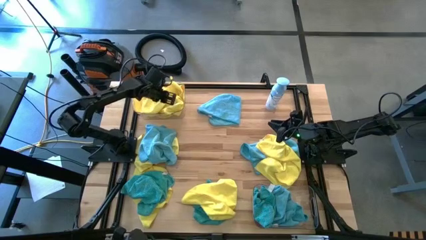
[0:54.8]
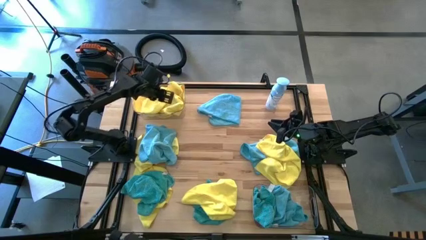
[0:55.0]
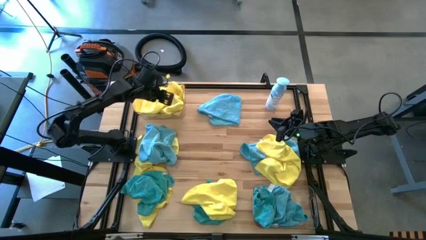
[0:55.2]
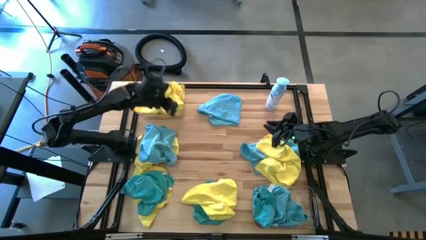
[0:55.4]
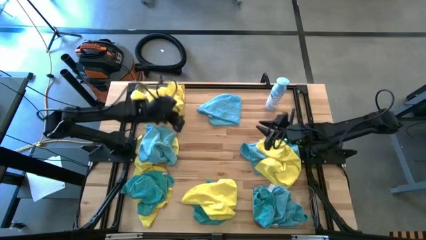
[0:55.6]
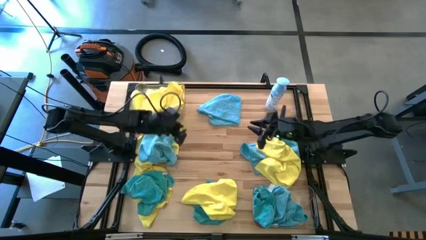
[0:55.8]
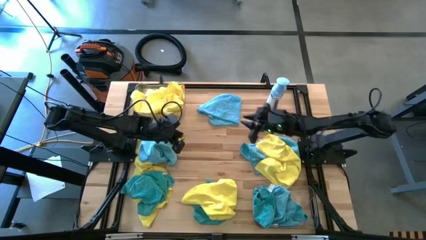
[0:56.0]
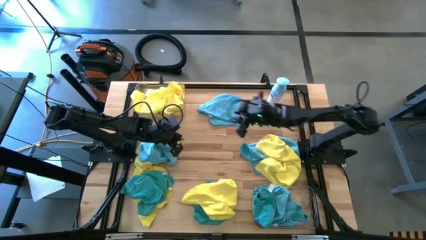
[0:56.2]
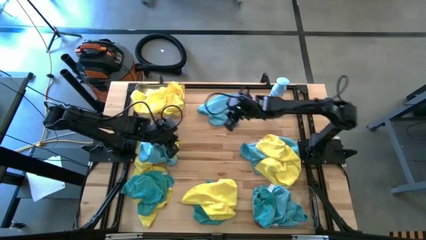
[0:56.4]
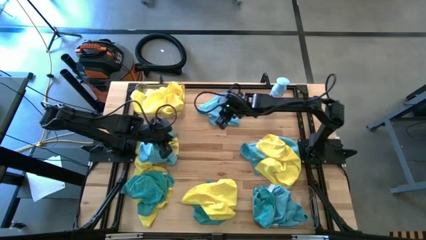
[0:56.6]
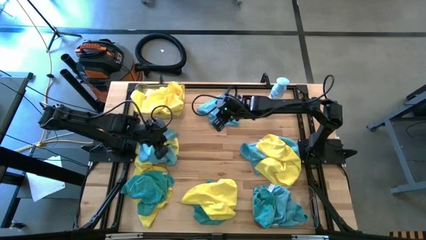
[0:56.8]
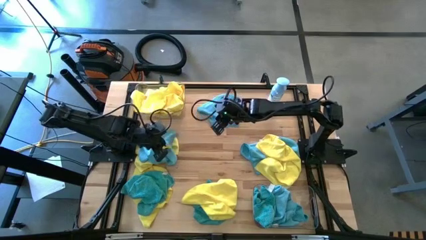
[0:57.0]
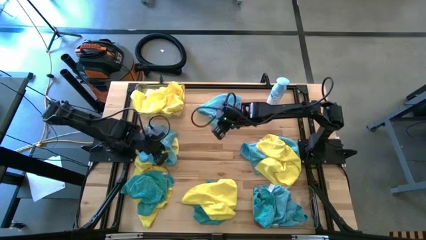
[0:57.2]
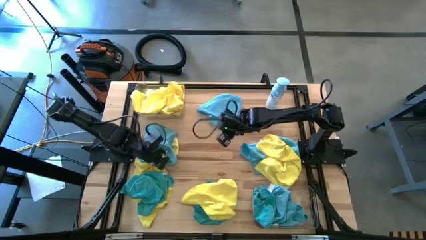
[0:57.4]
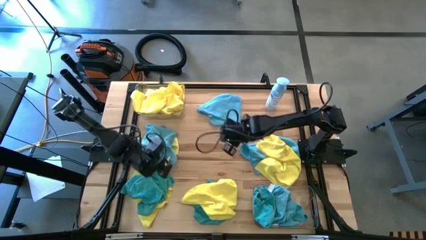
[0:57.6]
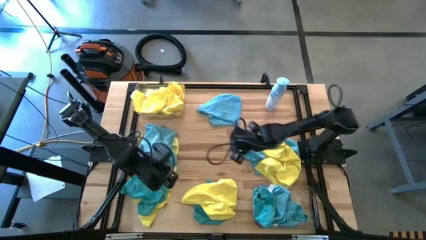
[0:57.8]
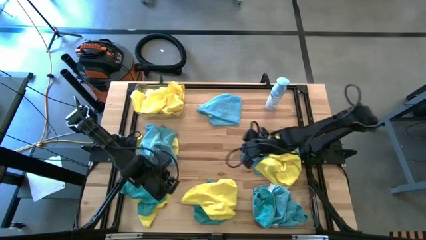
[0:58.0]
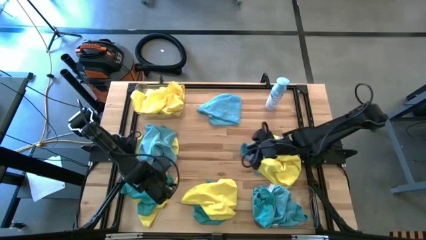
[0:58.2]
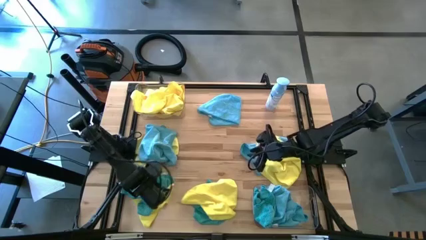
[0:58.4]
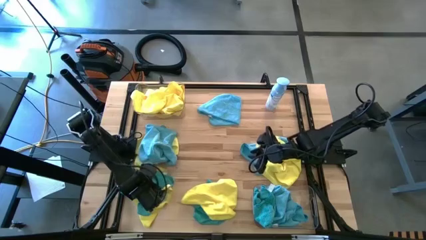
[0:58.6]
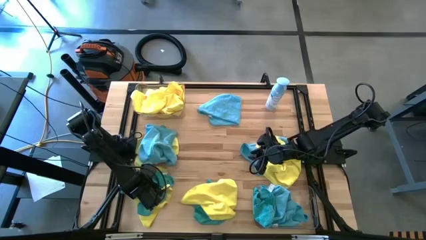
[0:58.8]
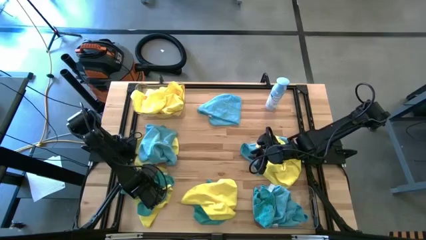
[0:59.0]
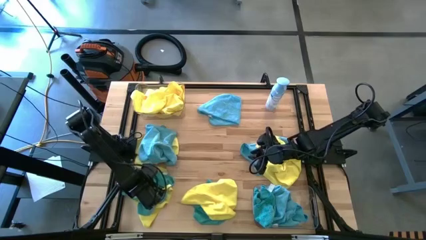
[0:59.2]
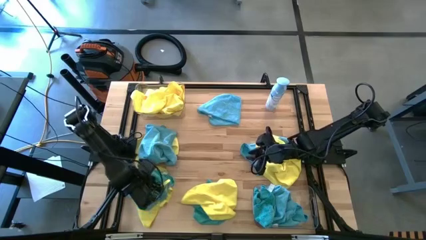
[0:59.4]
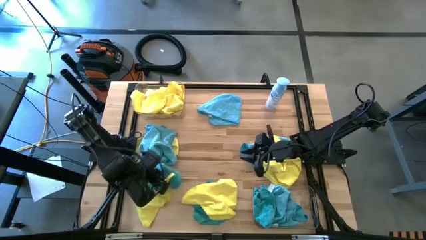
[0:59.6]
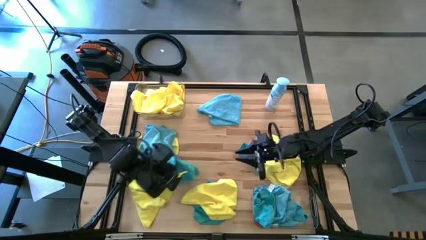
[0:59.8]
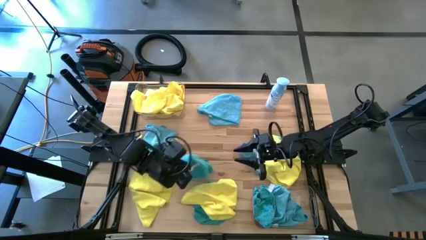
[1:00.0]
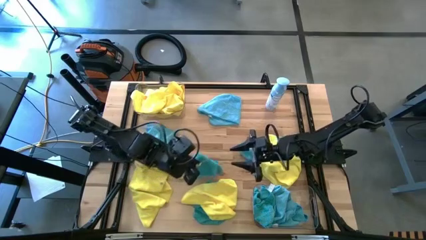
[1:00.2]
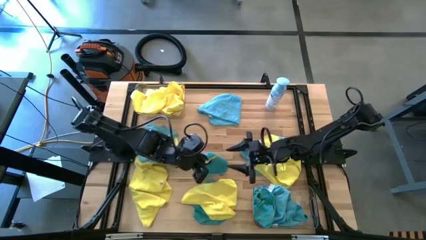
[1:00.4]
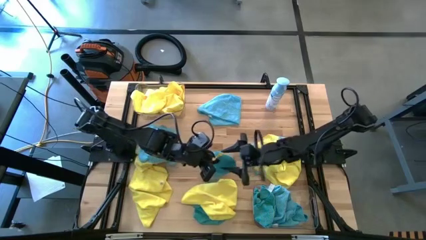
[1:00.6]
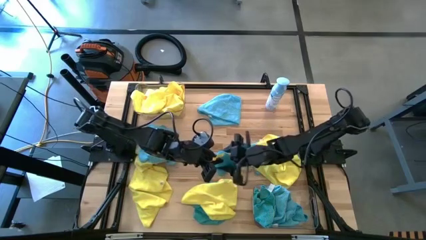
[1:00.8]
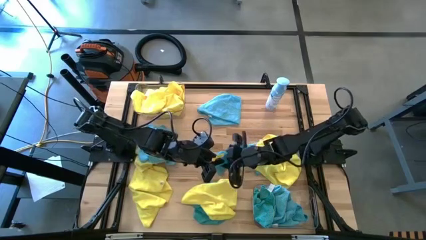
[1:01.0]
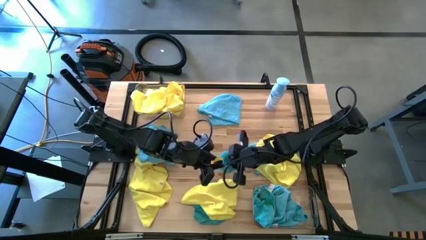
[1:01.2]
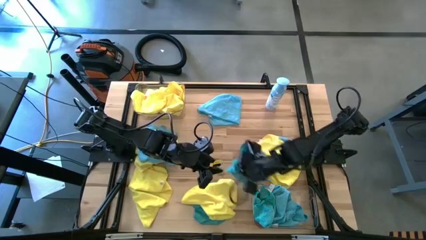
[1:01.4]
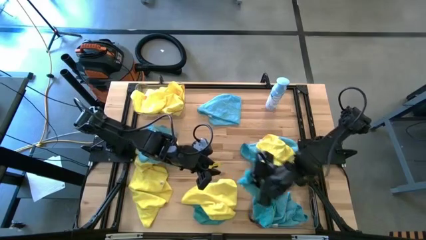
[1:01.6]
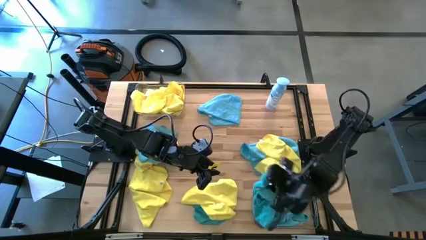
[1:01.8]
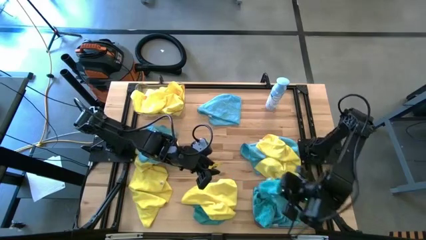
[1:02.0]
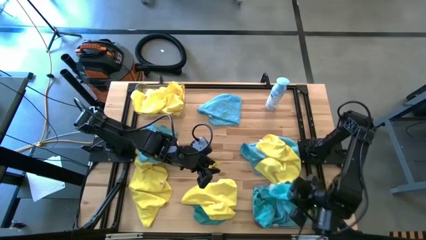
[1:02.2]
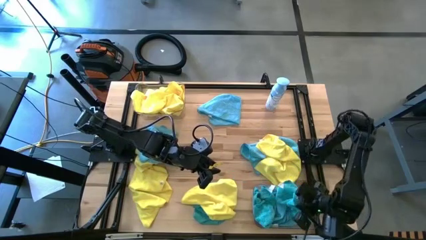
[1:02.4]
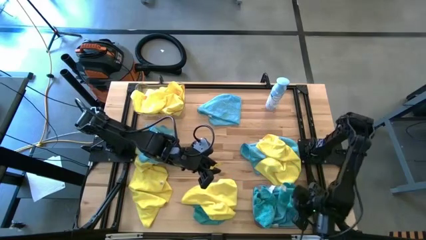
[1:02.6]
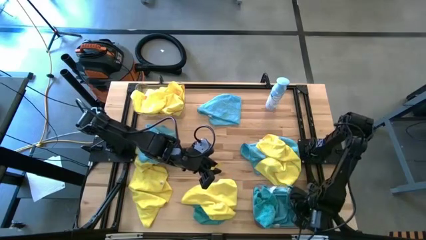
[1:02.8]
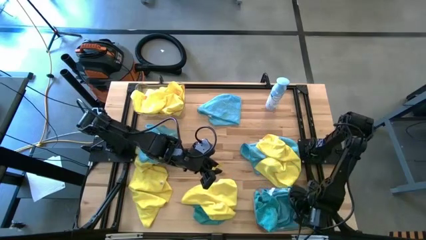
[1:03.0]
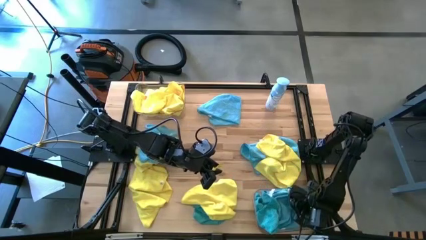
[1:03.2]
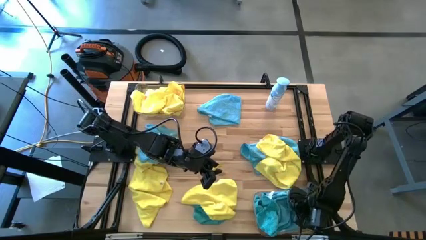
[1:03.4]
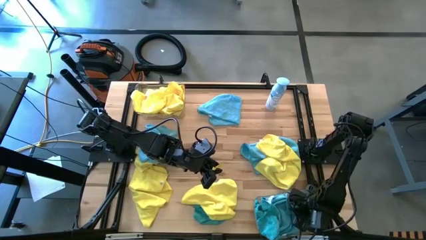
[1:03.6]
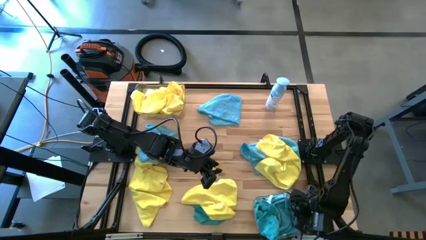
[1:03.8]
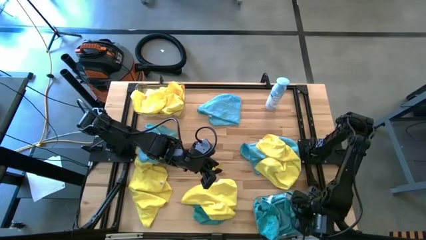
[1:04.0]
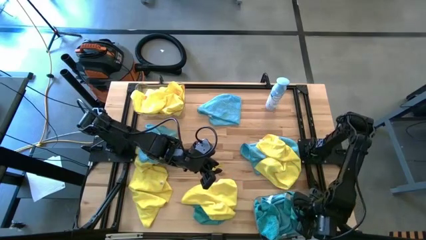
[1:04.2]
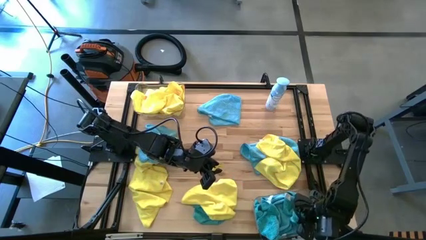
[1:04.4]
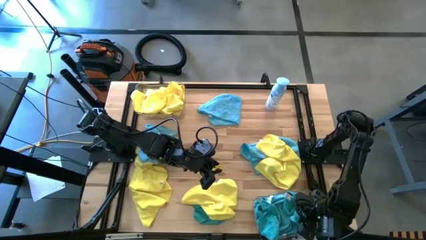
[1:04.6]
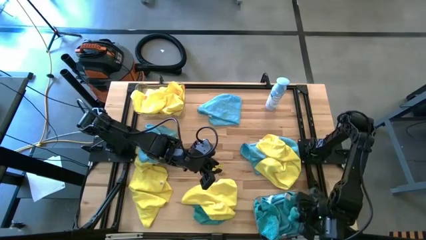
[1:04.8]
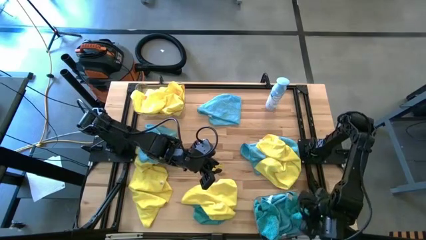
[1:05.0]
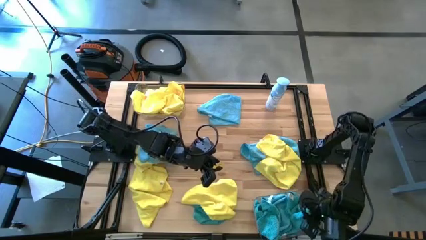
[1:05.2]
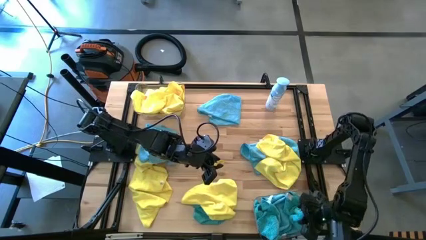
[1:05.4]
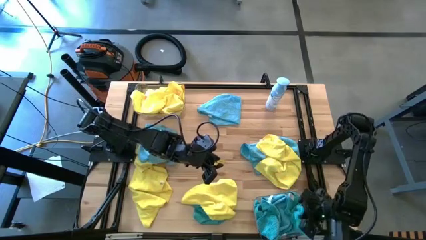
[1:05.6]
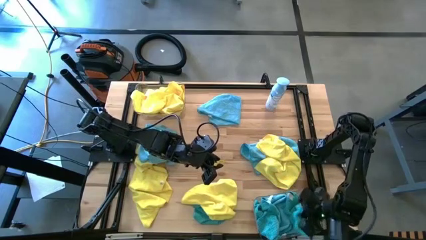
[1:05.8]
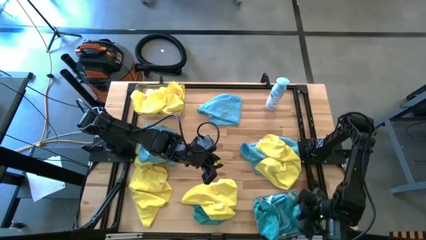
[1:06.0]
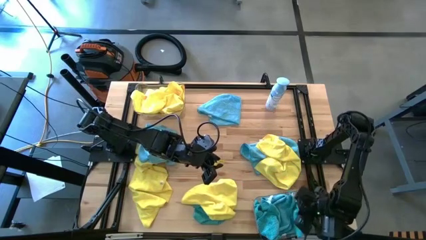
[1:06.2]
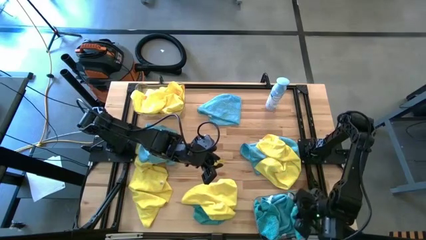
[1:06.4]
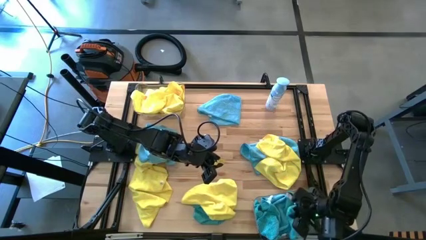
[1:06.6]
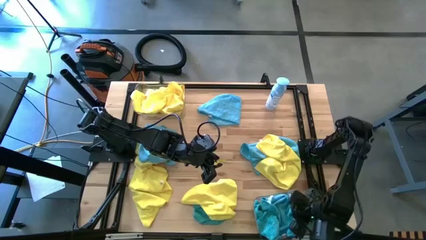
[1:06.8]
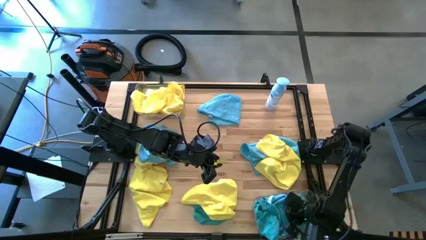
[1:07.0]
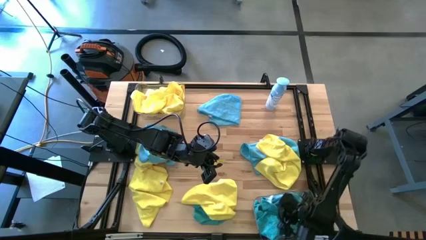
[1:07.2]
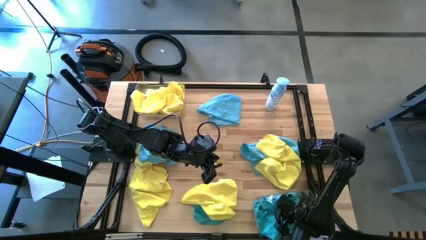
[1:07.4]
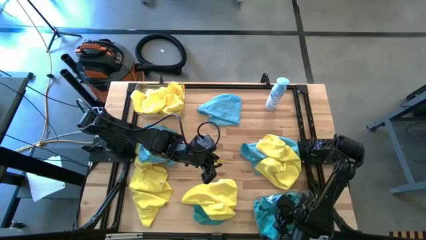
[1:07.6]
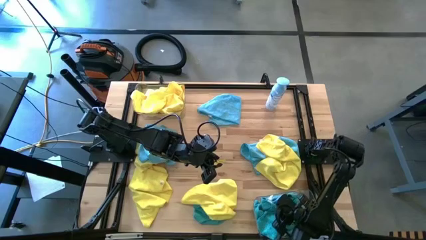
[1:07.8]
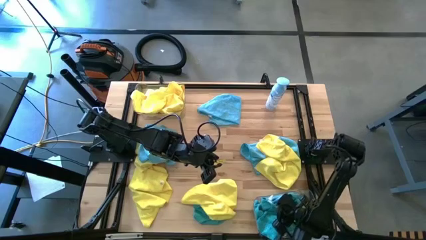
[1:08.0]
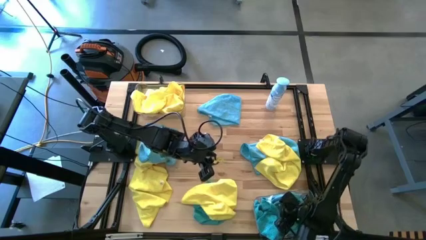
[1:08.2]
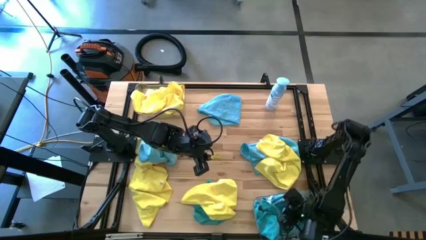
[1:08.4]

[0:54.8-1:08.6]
Task: Sort microfiber towel by color & place in baskets
Put the blue towel into the bottom transparent bin
